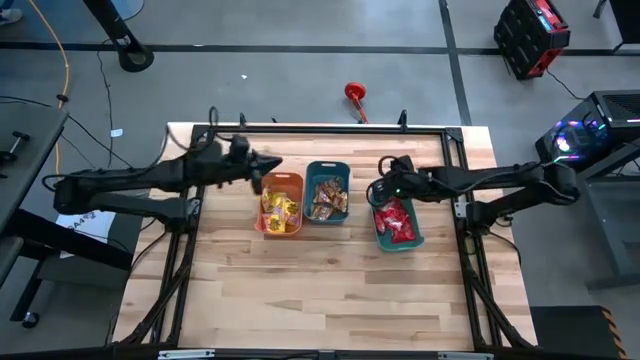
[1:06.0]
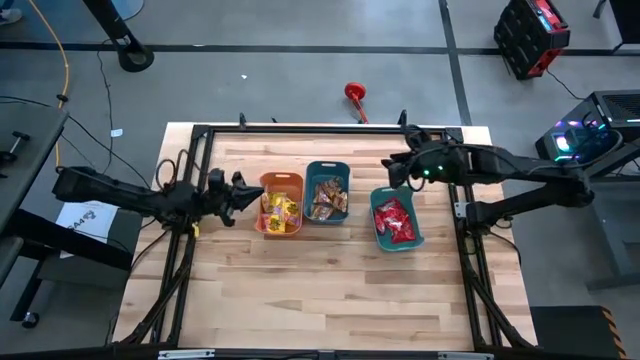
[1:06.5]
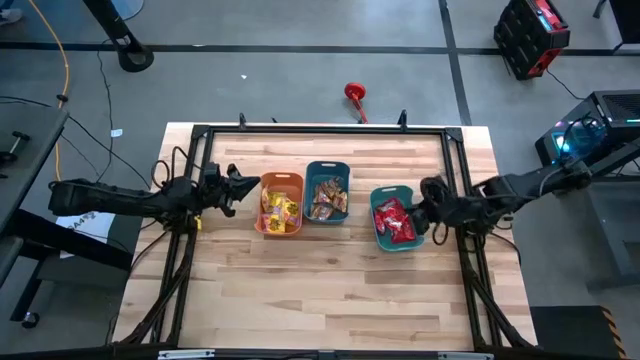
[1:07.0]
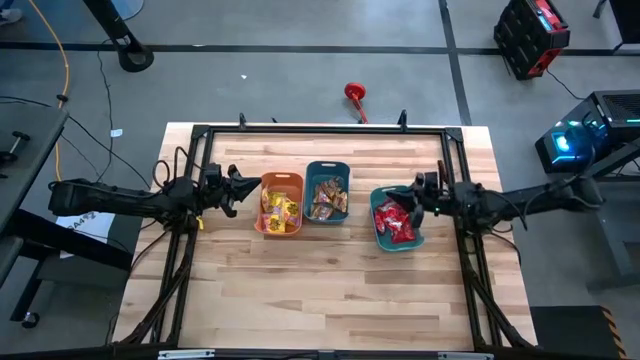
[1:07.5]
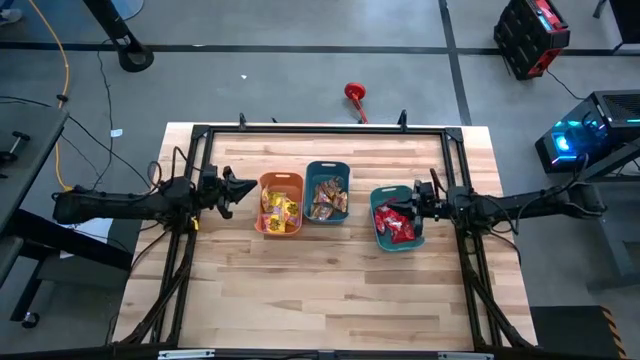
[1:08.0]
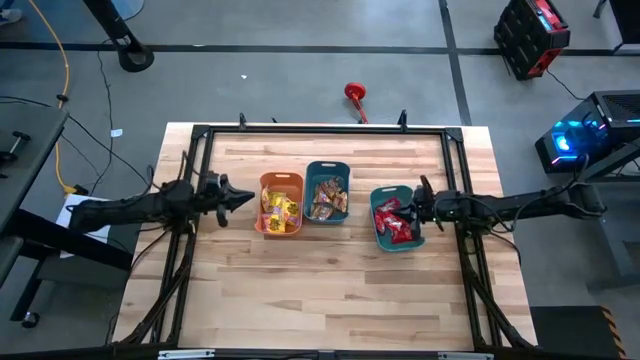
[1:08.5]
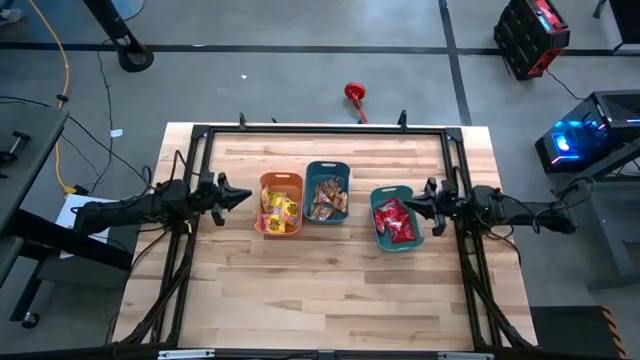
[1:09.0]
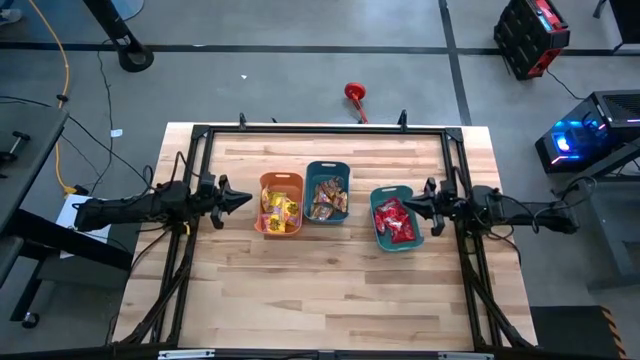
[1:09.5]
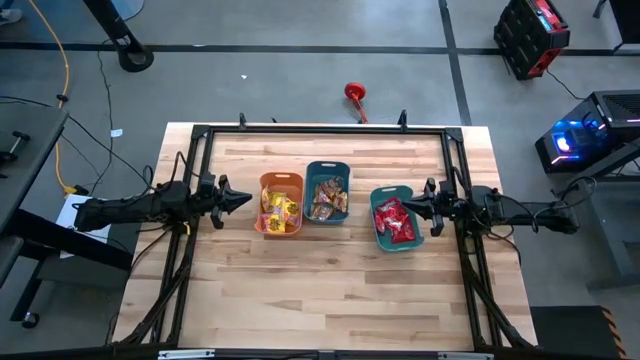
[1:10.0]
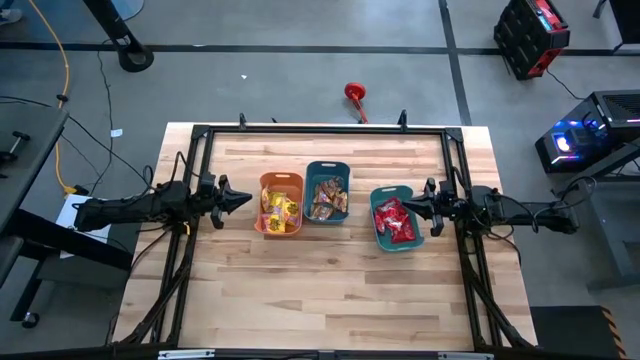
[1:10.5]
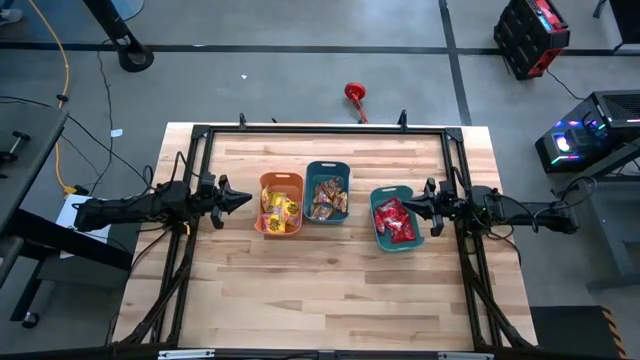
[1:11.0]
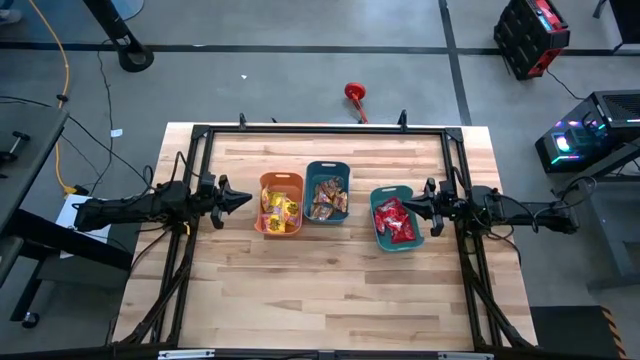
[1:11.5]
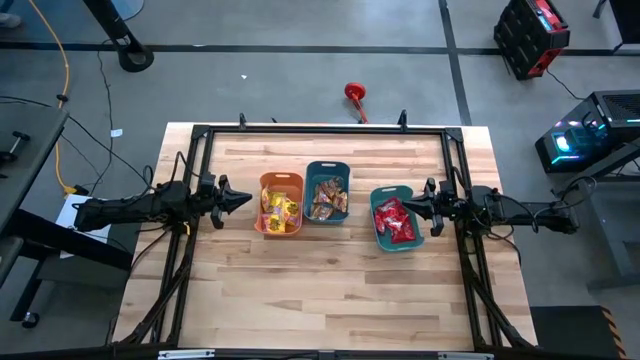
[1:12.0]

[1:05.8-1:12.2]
Task: Sort candy
Return to Home Position

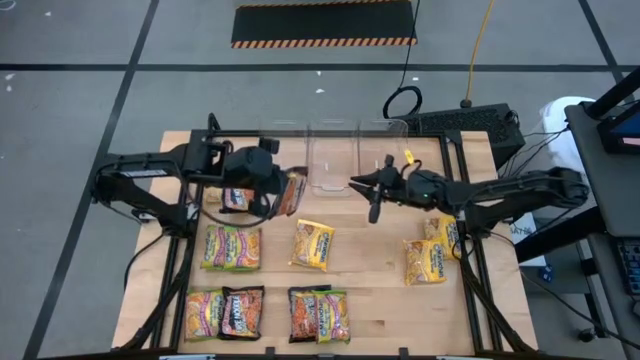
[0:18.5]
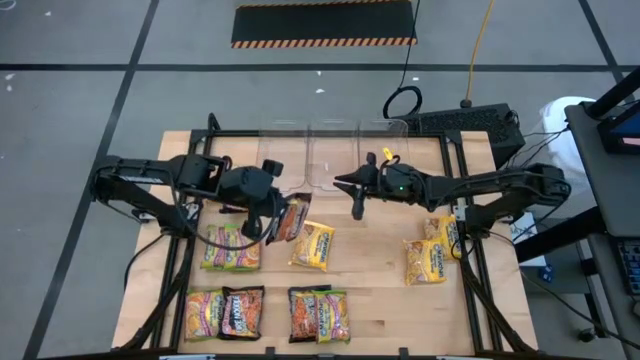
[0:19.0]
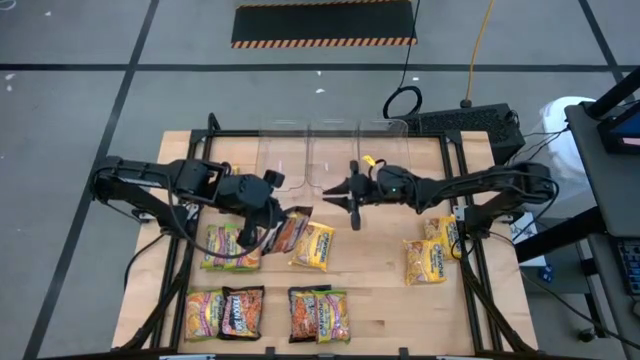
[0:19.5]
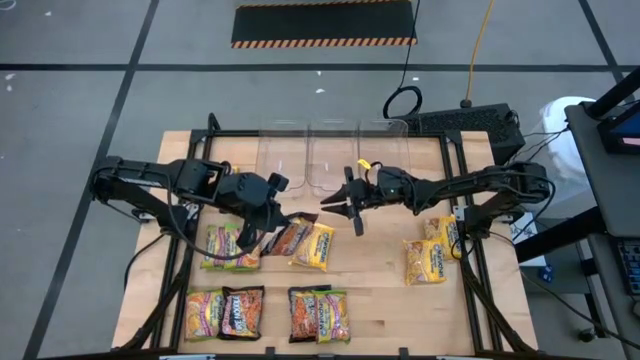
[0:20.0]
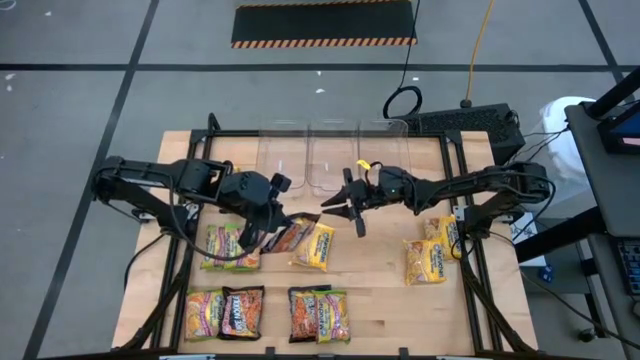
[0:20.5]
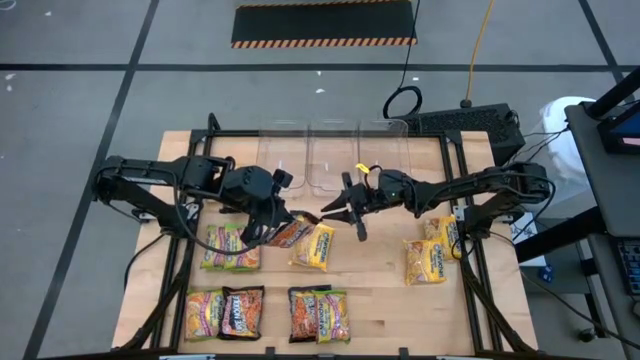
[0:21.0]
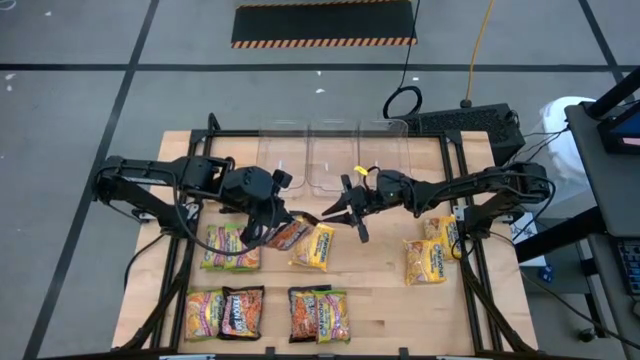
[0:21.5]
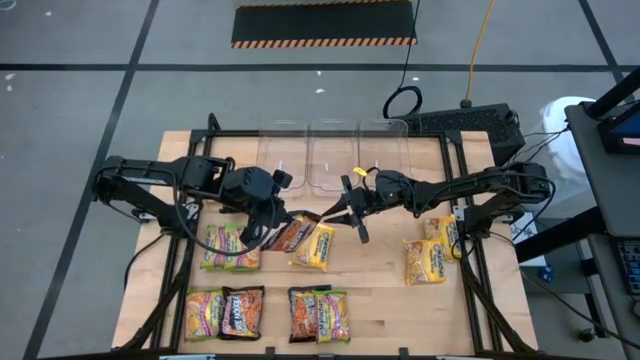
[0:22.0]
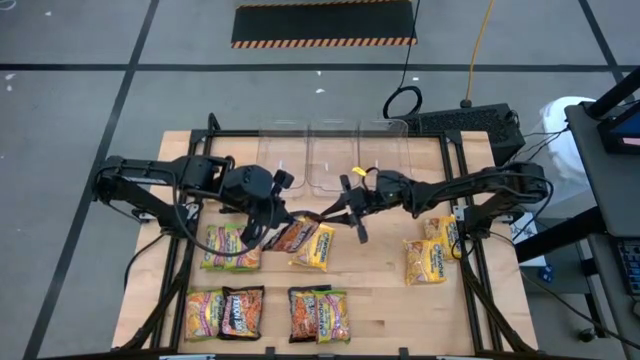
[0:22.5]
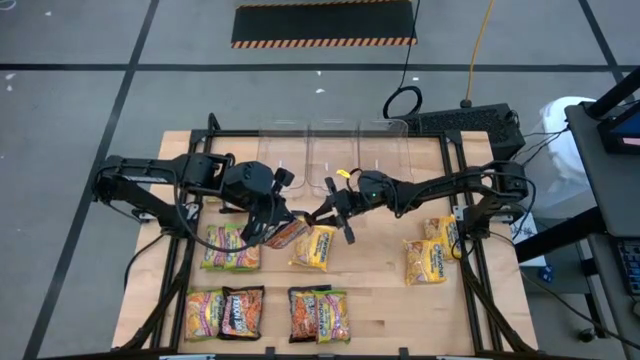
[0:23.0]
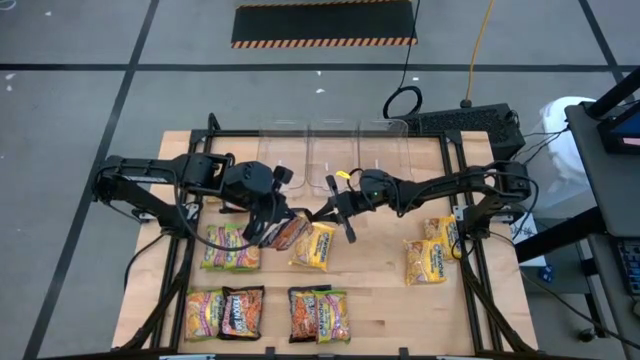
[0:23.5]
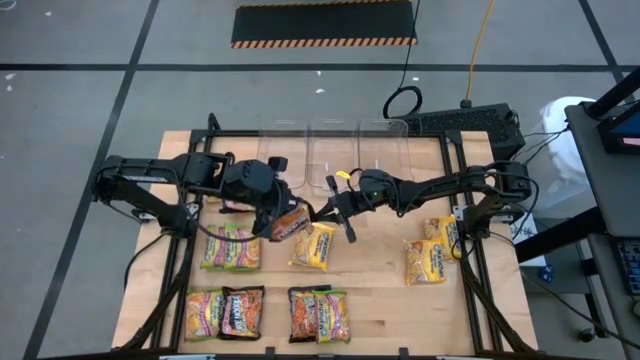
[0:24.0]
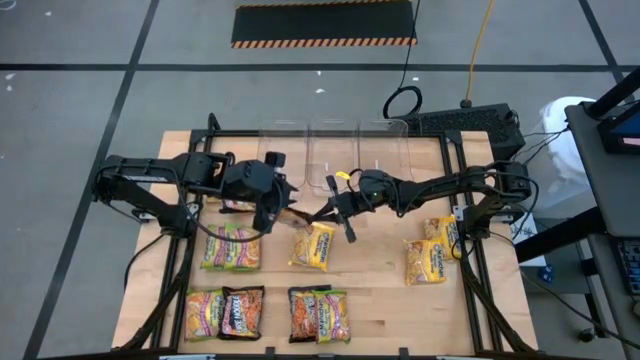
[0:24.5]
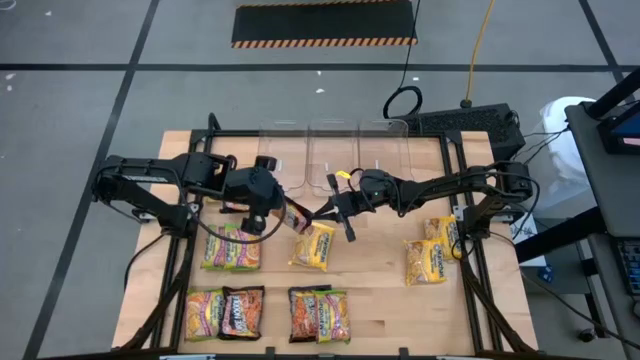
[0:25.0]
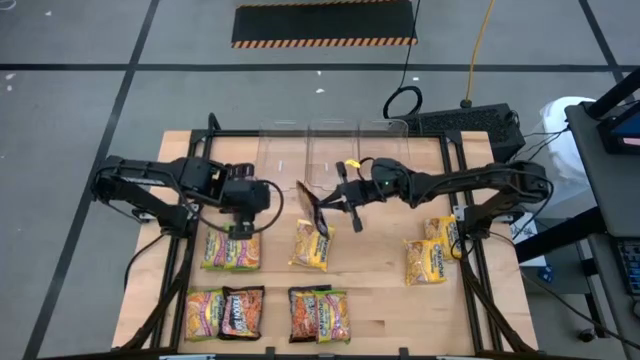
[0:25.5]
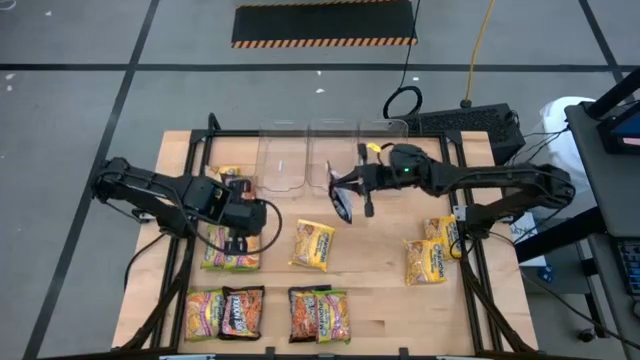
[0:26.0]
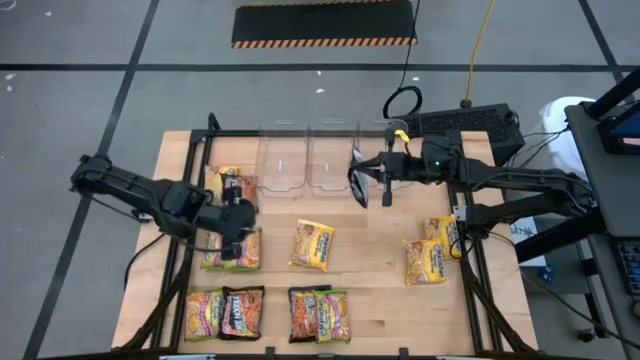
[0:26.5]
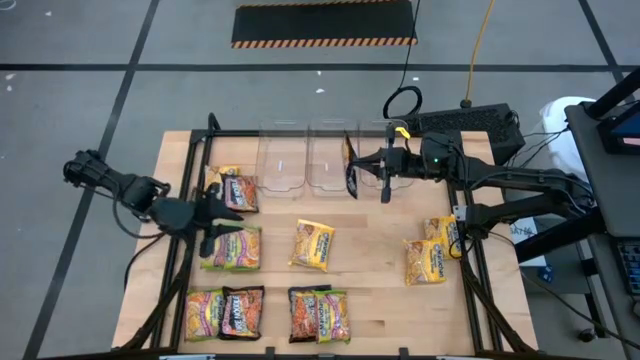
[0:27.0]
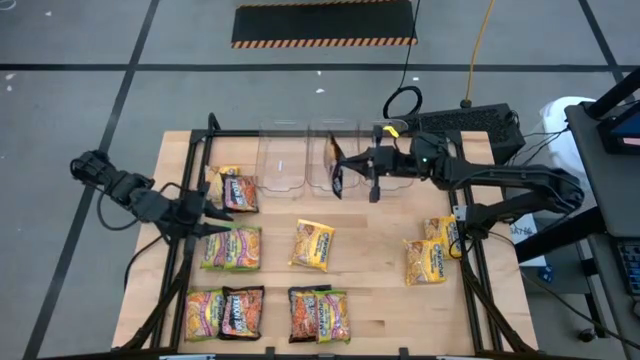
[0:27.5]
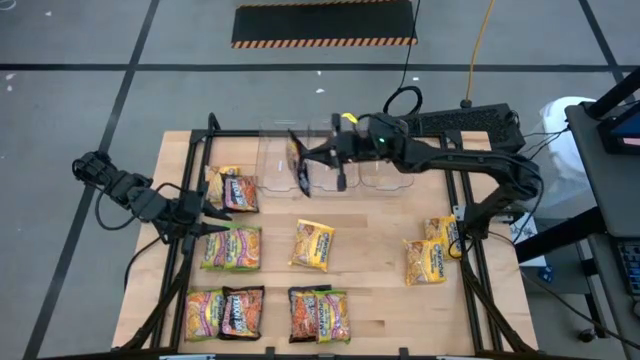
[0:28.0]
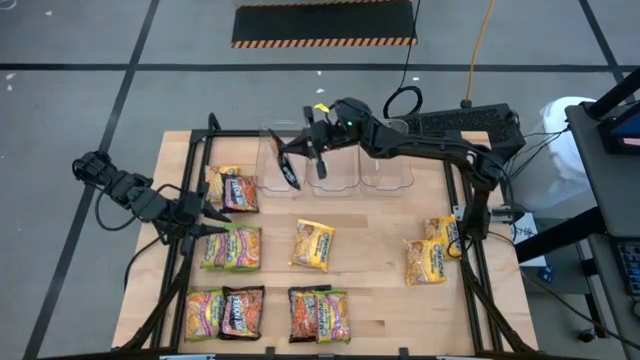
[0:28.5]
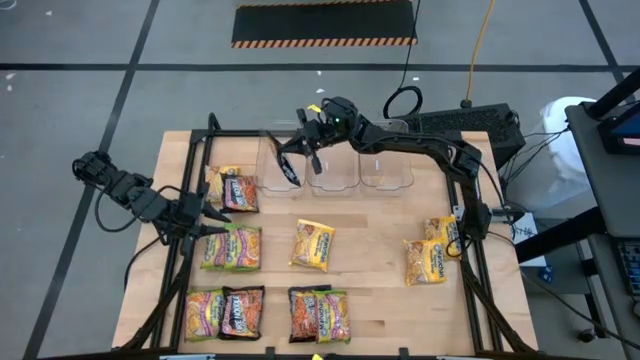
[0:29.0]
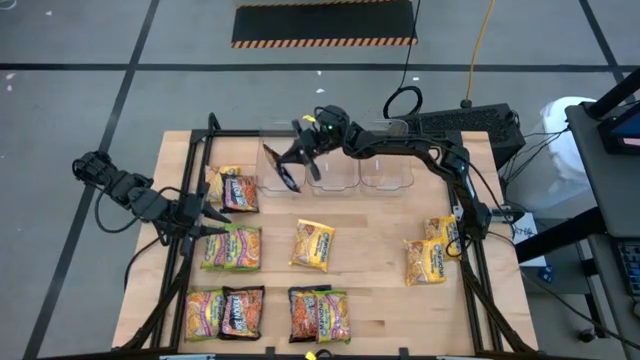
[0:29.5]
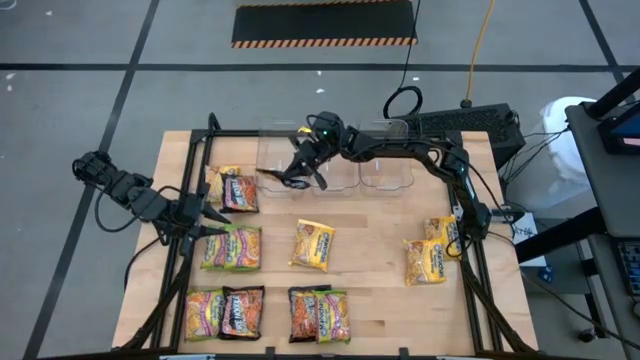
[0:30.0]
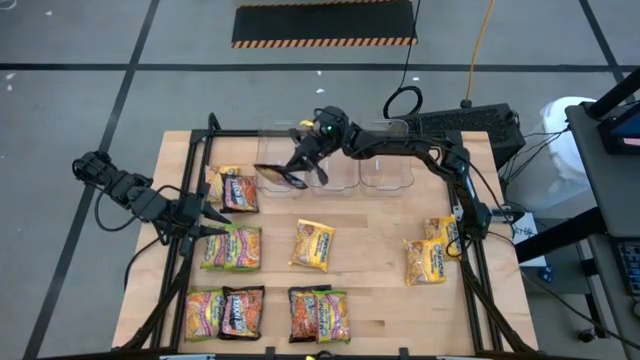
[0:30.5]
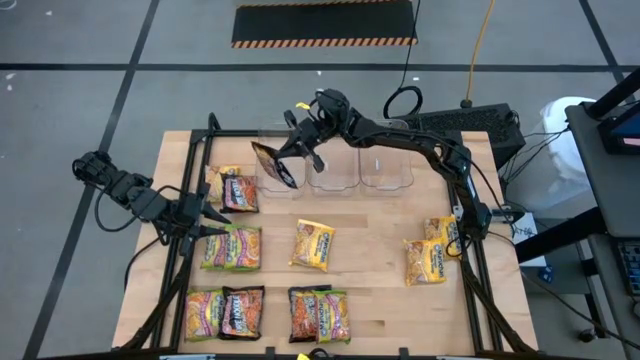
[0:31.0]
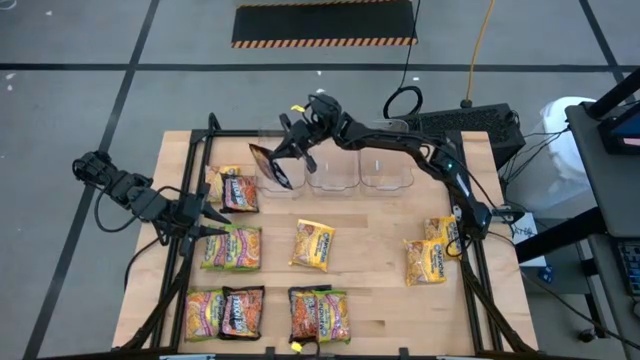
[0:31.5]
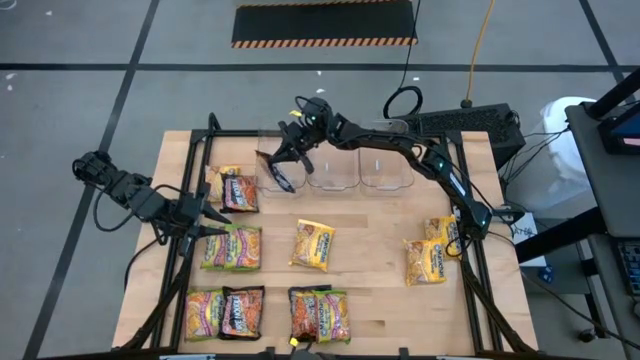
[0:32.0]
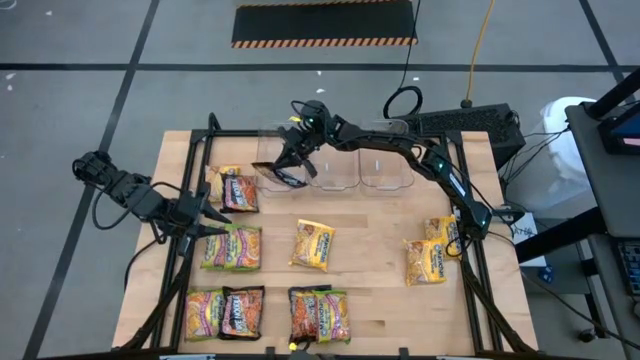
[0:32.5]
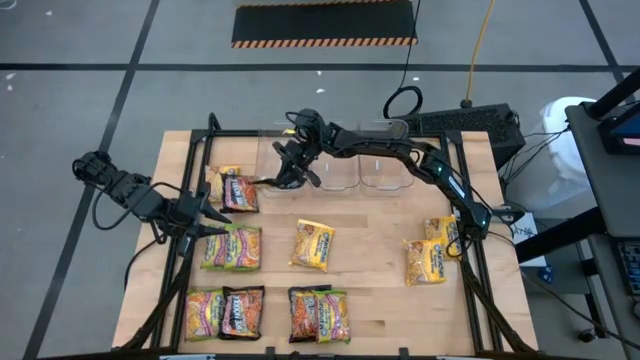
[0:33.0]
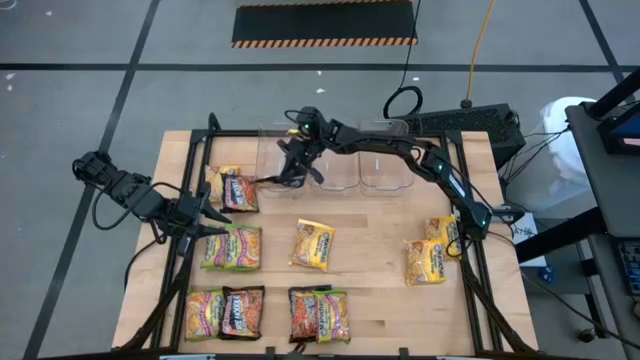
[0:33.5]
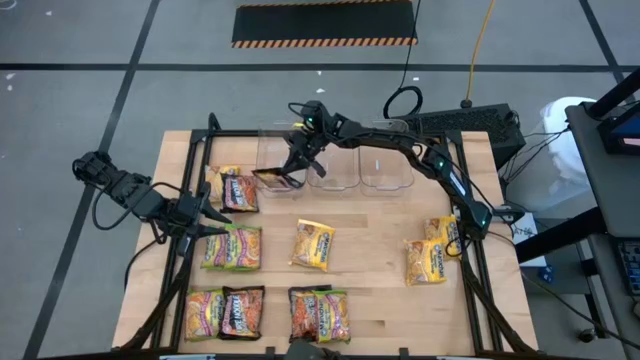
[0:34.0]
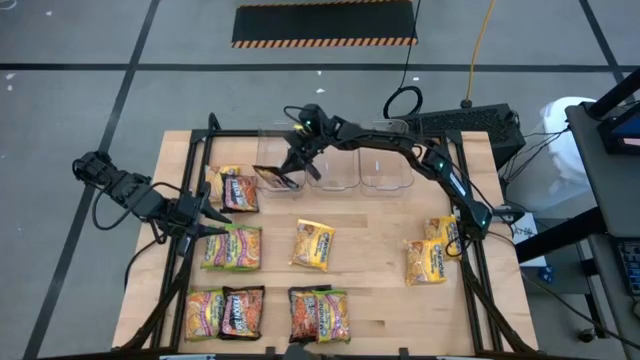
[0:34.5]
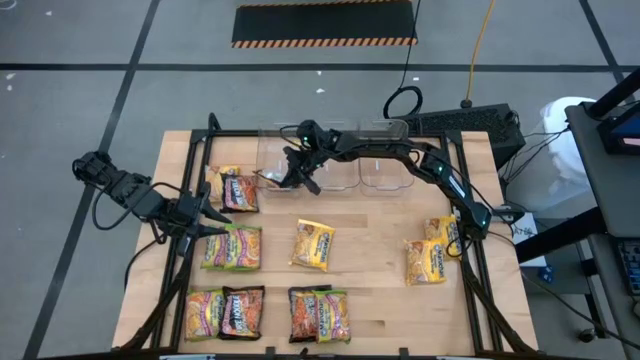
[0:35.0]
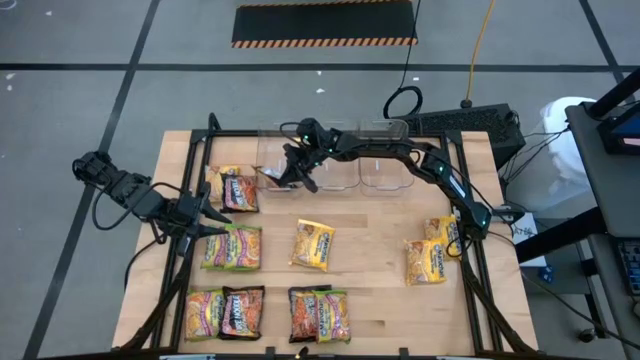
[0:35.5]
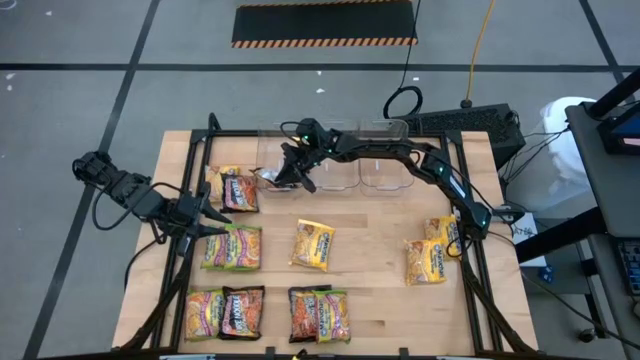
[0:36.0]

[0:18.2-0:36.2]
Task: Sort Maruchan noodles
Put the black noodle pack into the left transparent bin
